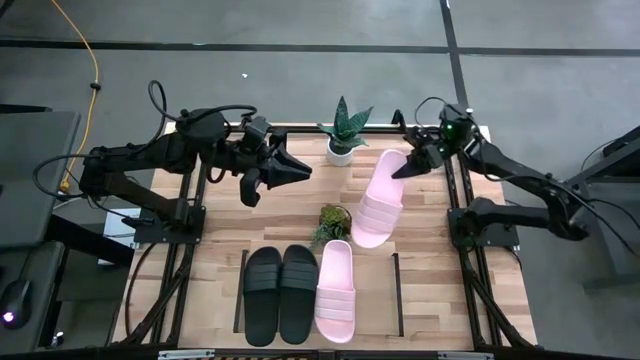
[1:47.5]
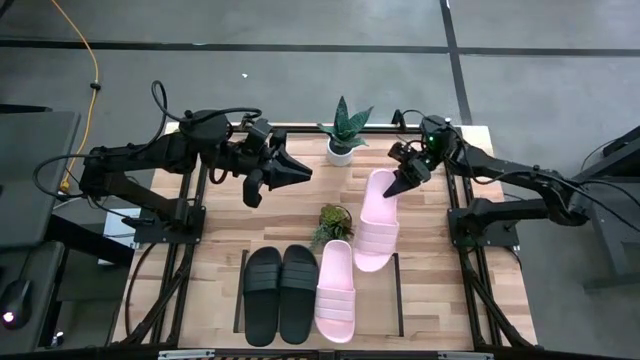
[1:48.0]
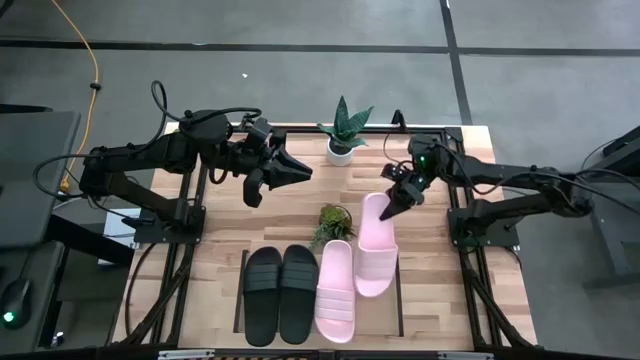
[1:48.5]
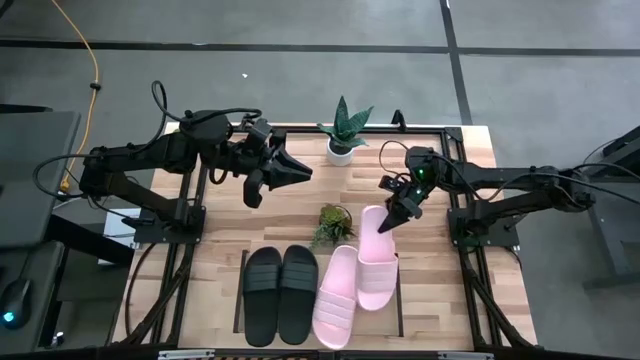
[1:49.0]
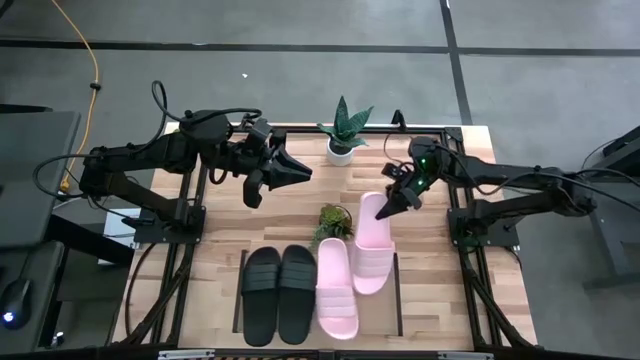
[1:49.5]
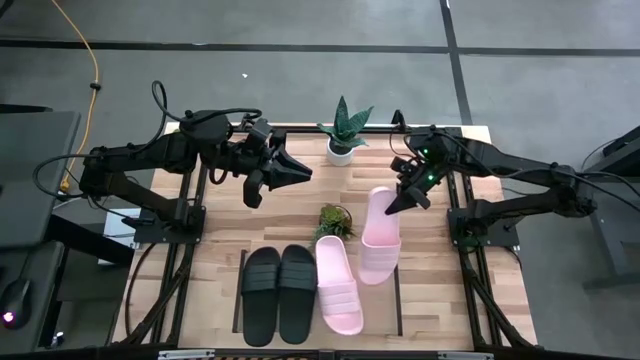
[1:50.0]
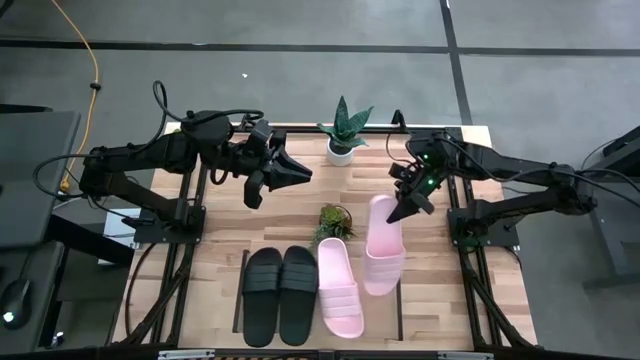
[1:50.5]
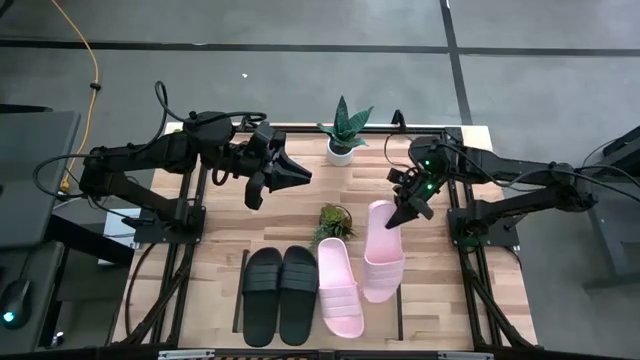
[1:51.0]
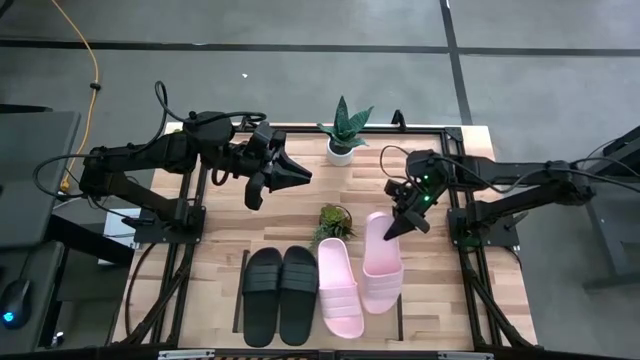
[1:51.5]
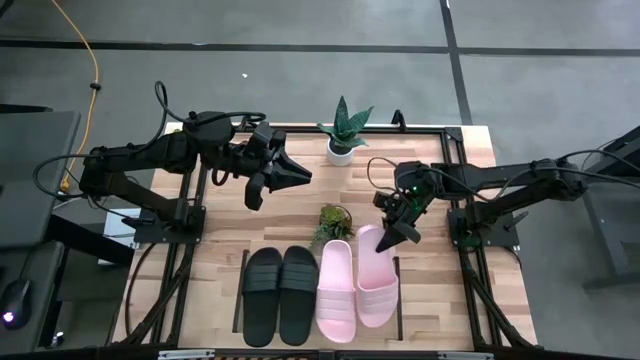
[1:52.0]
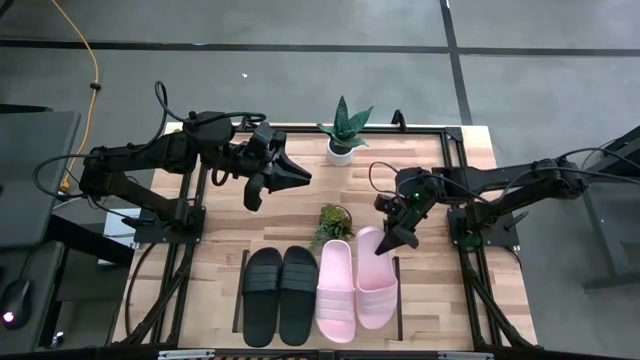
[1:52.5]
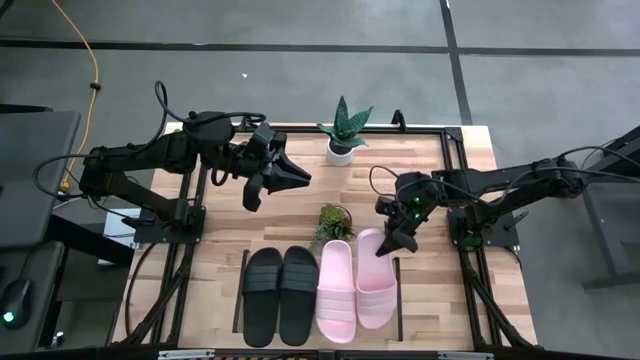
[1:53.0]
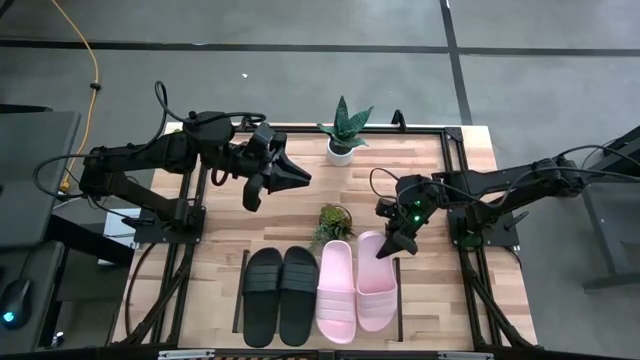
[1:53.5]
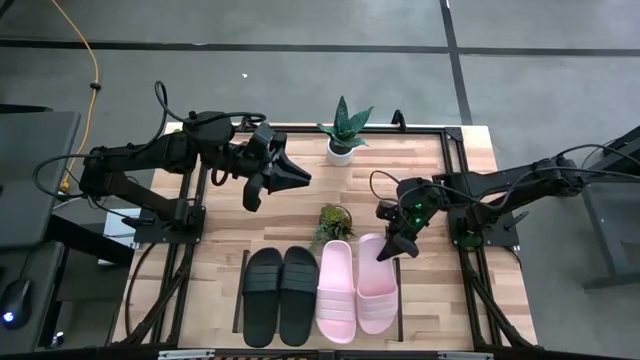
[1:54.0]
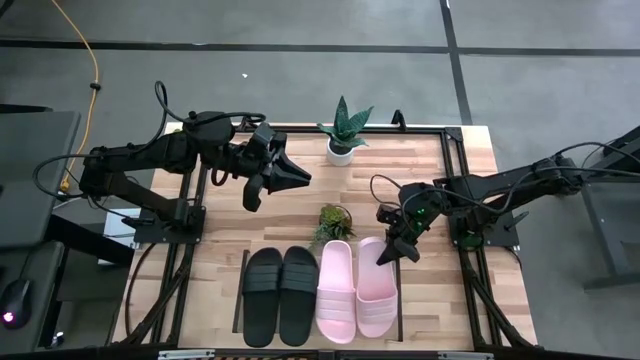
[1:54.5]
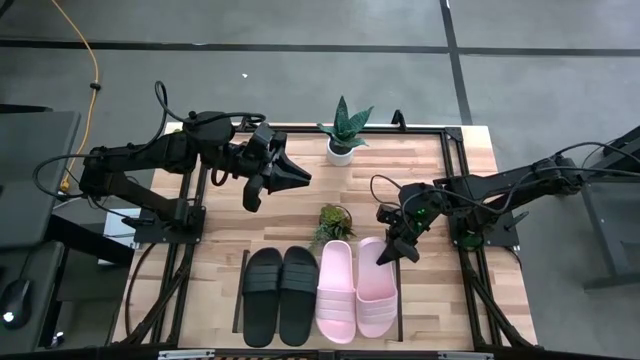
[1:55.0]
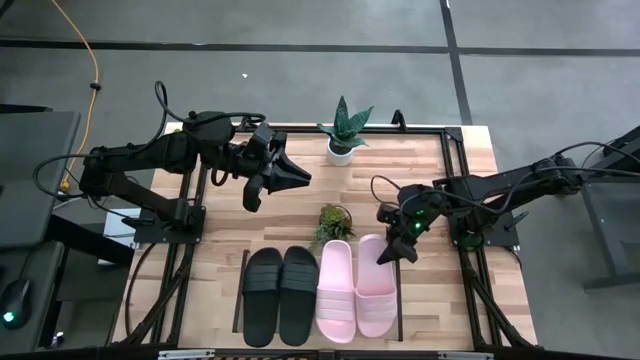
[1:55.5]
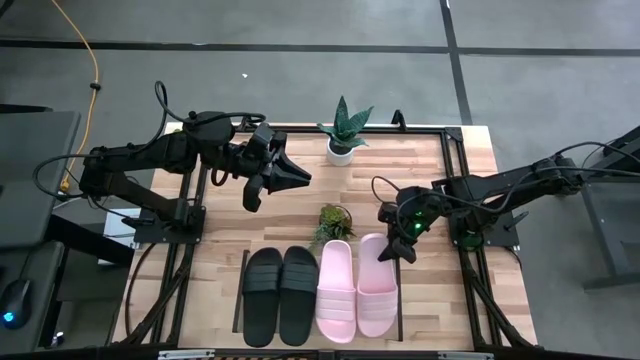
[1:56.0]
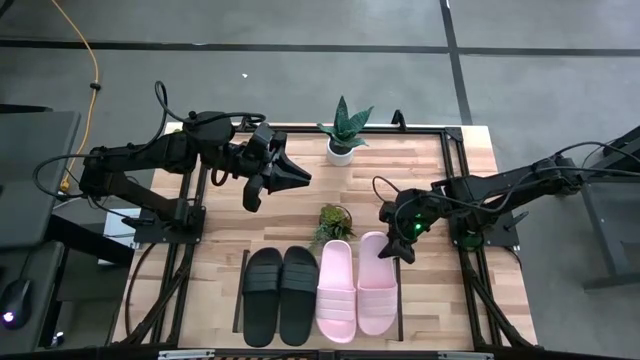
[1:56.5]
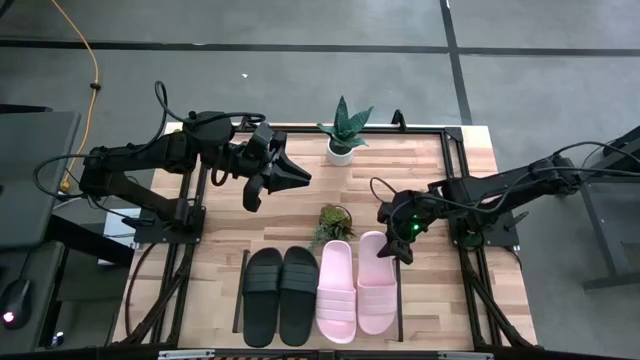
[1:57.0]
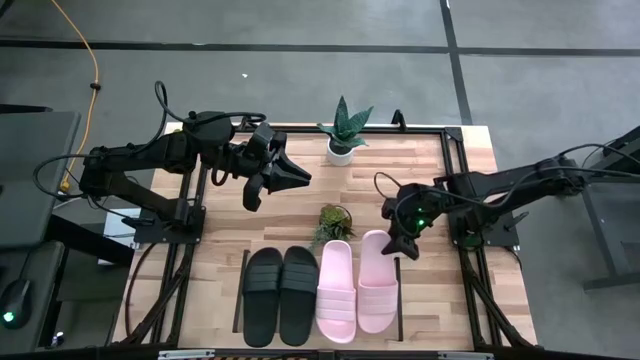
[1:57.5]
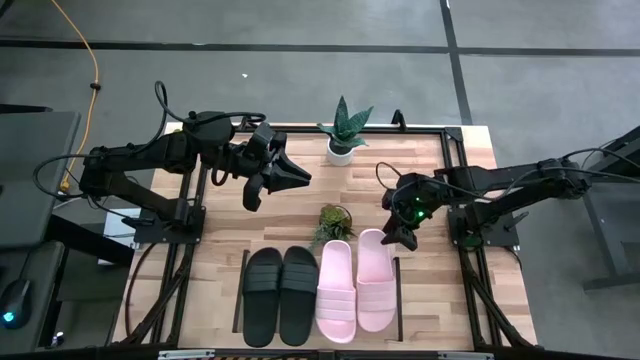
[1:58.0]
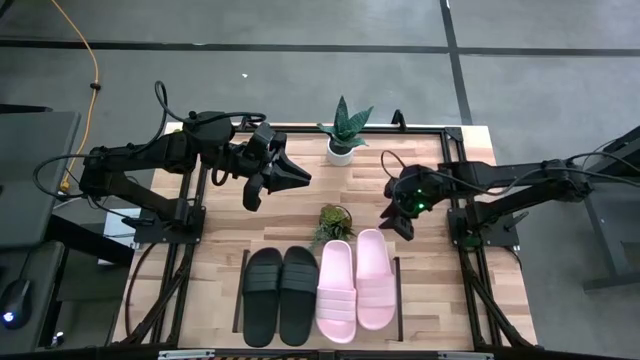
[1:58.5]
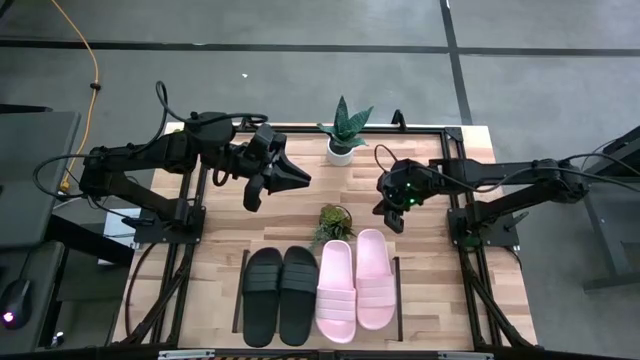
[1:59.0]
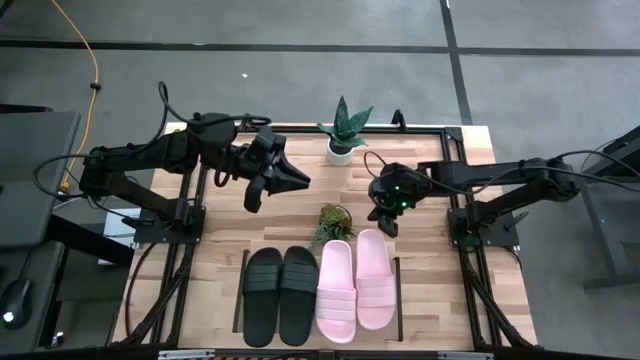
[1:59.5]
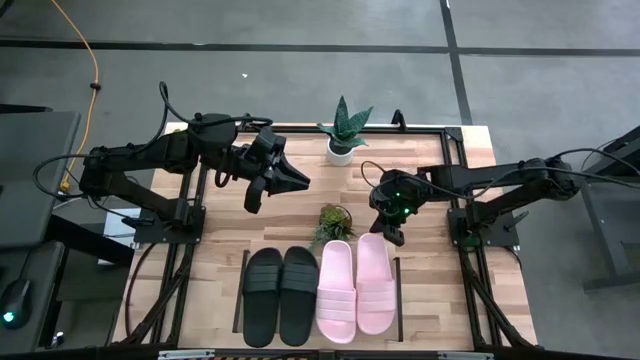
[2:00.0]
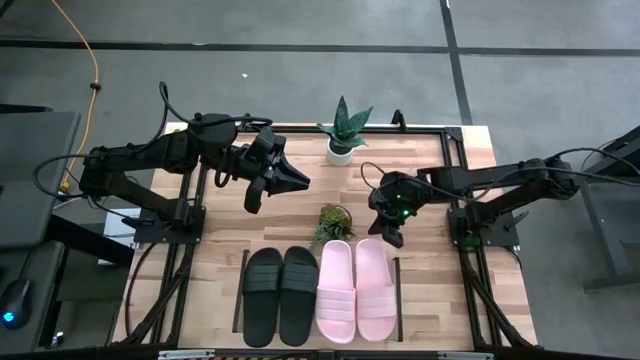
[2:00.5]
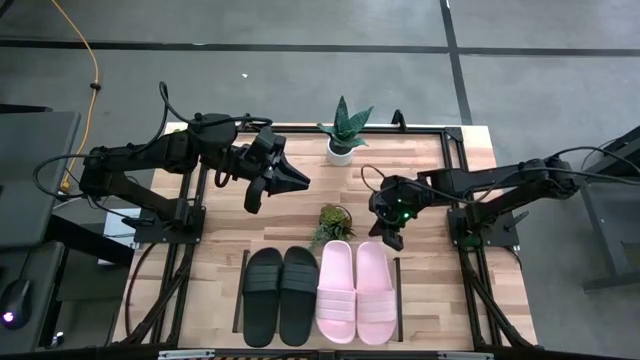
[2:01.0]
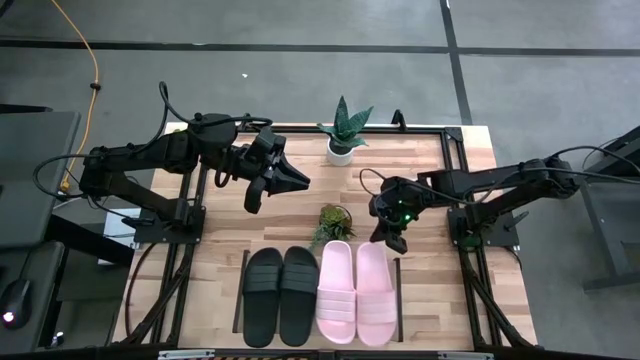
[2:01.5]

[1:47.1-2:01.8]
Task: Pick and place slides into the shelf
Put the pink slide on the shelf

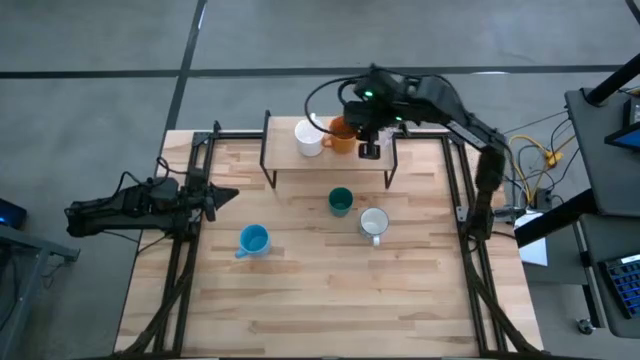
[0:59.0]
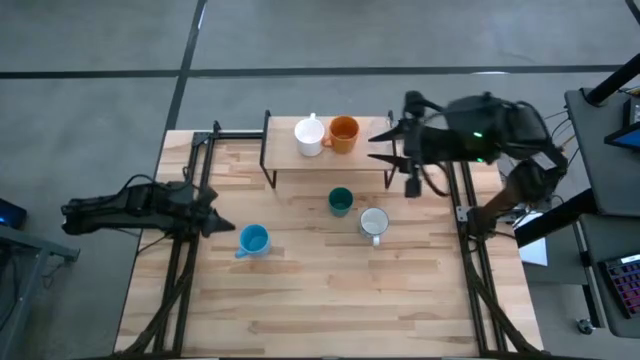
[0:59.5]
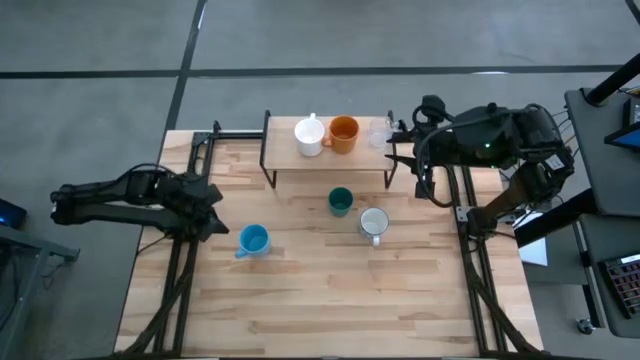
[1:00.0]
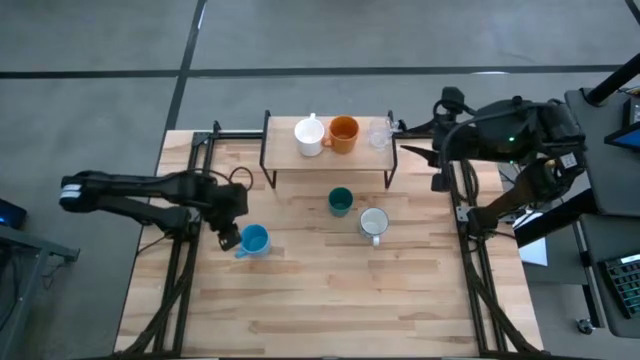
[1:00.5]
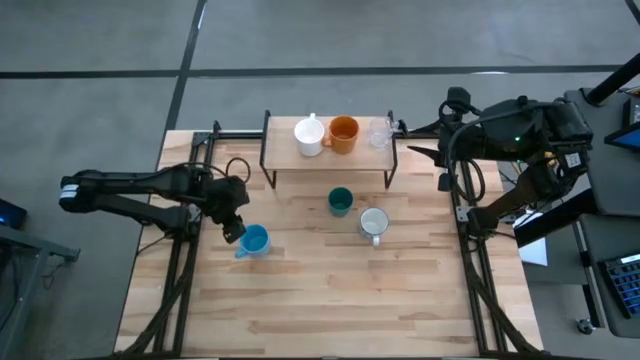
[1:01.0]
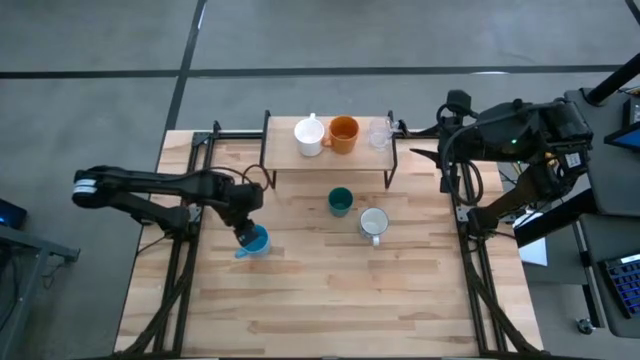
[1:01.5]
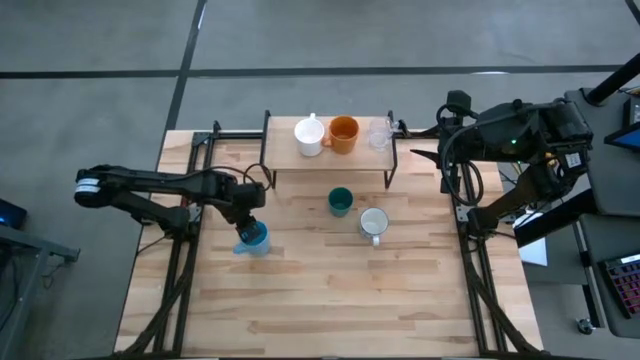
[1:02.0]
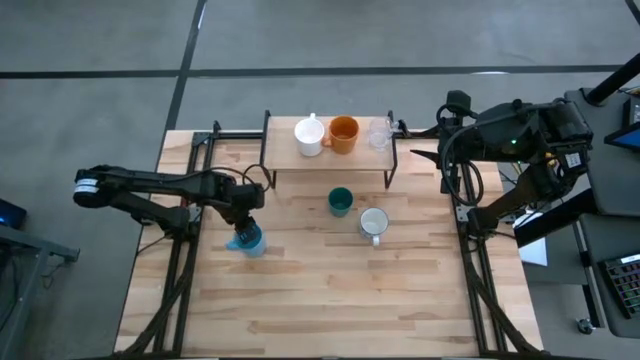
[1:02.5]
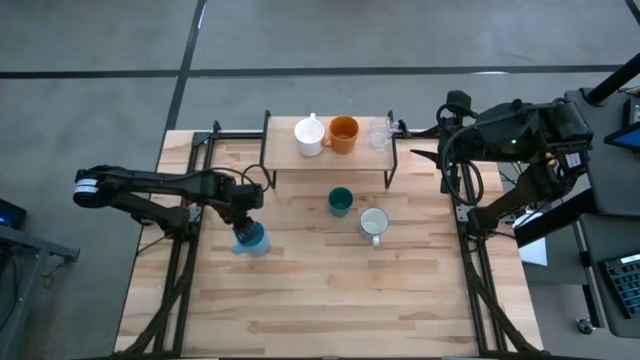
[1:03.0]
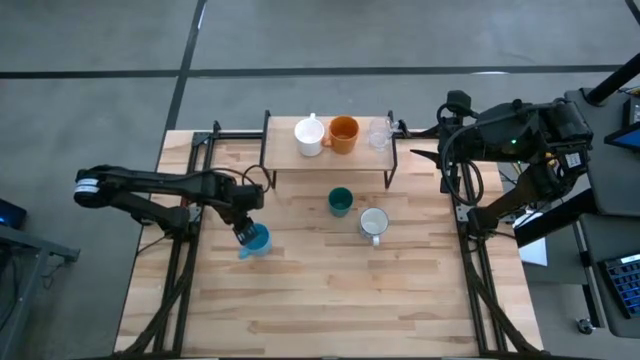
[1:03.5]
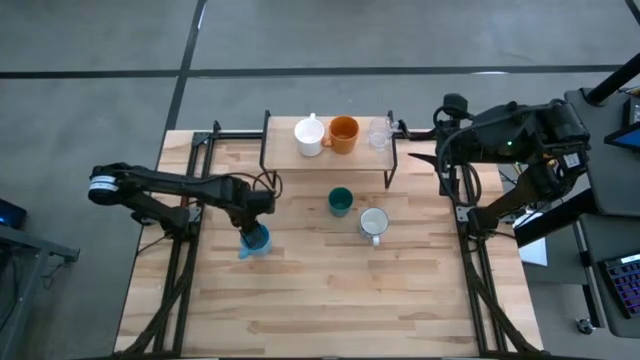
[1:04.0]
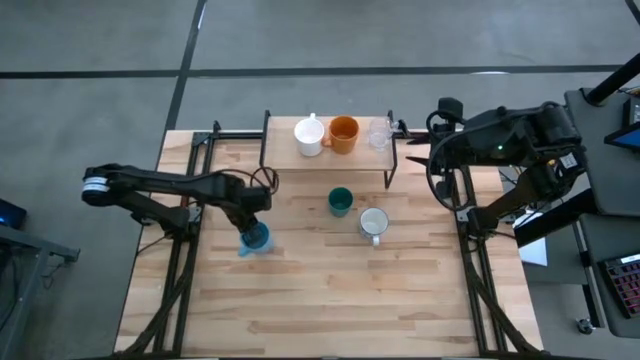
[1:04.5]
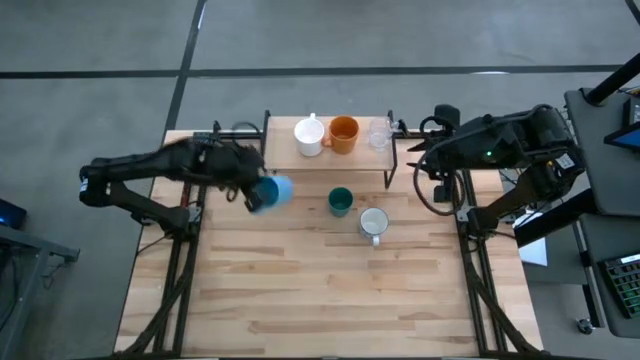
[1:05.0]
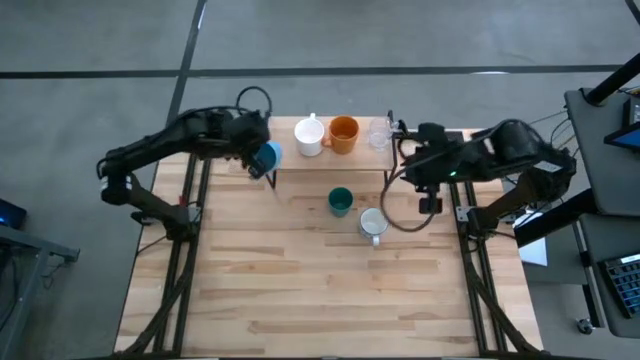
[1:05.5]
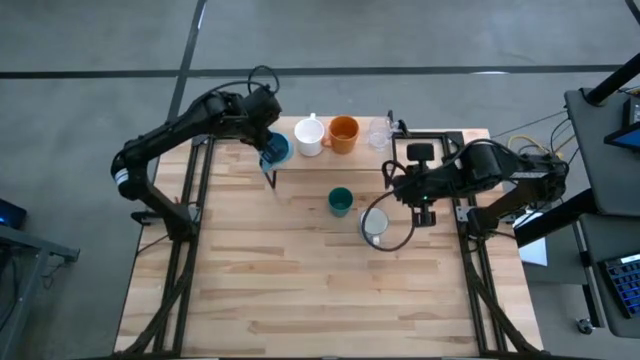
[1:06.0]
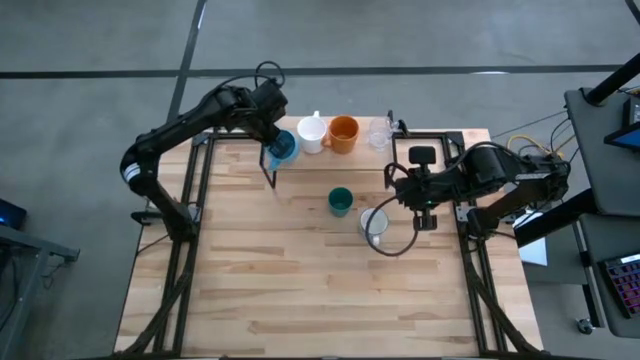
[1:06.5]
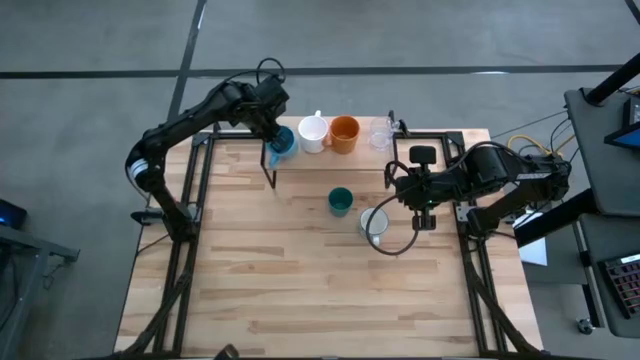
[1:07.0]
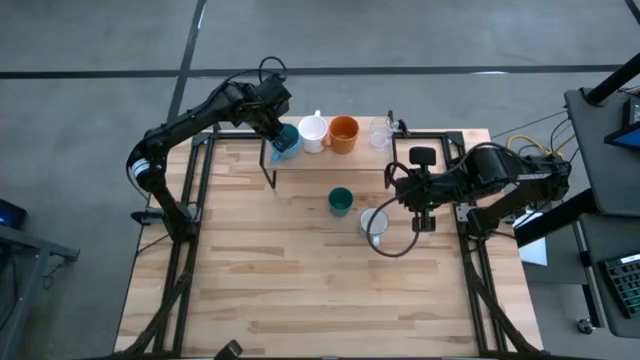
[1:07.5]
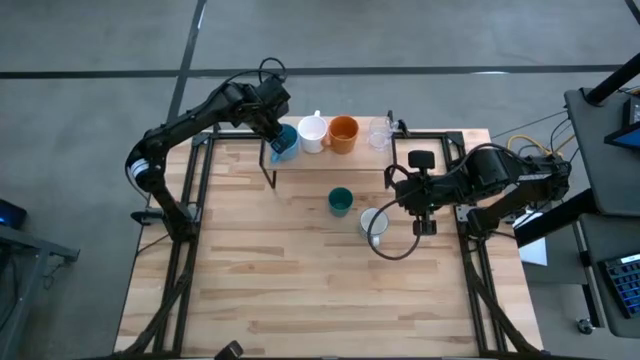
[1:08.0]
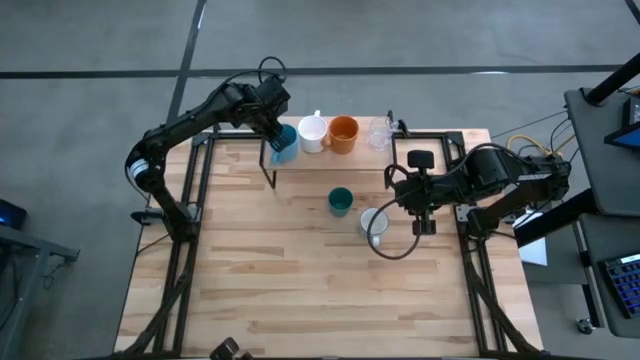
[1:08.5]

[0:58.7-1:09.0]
Task: Stack small to large cups/mugs on shelf
Put the blue mug on the shelf
